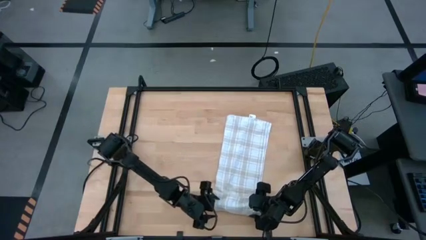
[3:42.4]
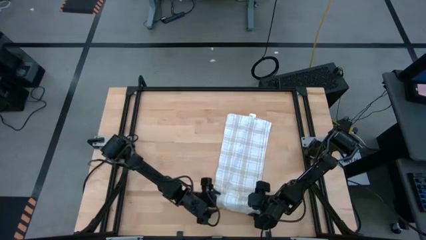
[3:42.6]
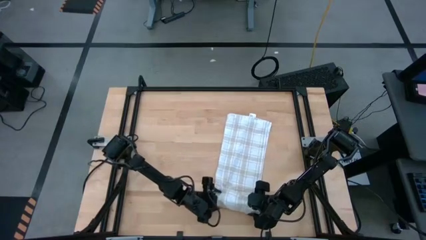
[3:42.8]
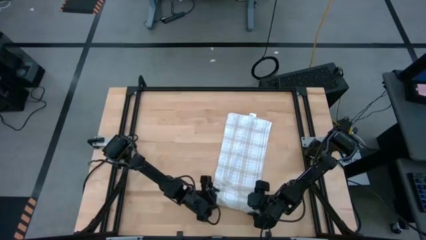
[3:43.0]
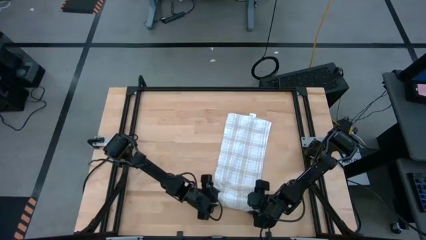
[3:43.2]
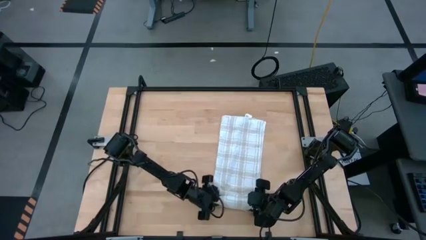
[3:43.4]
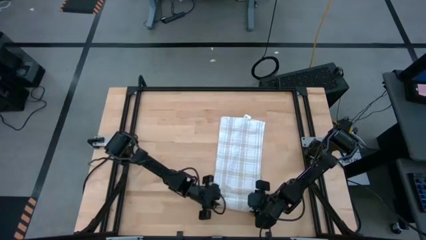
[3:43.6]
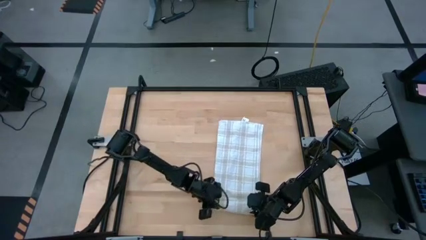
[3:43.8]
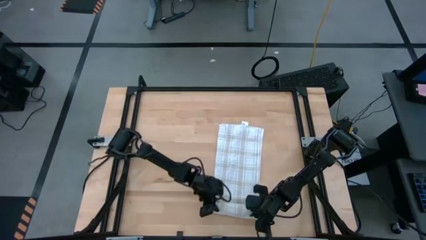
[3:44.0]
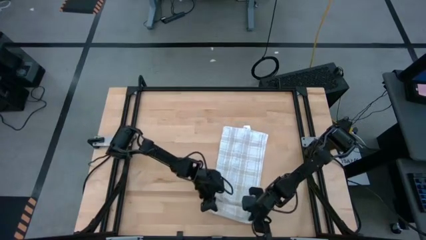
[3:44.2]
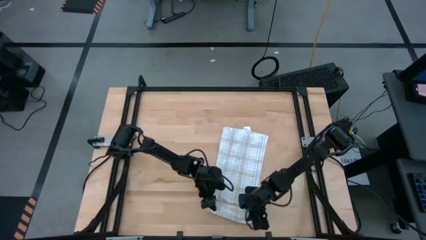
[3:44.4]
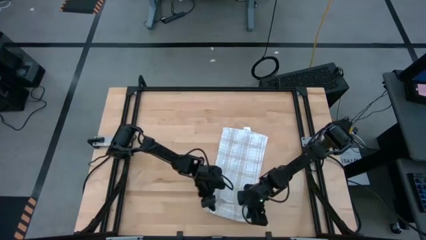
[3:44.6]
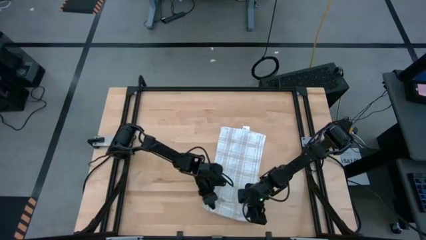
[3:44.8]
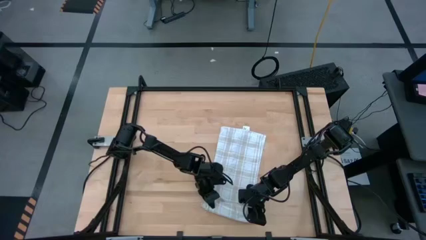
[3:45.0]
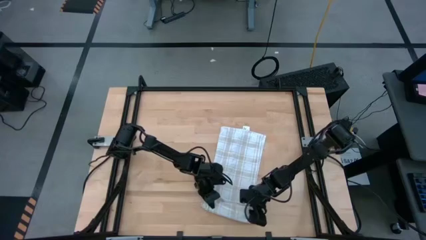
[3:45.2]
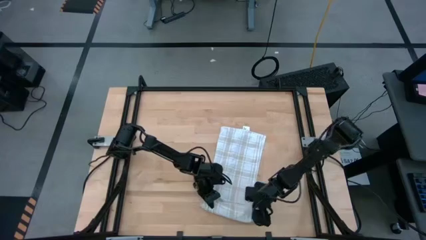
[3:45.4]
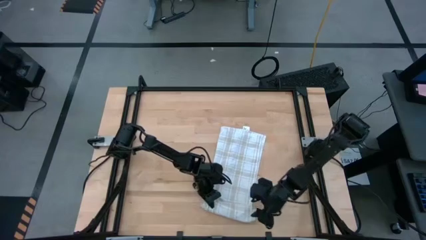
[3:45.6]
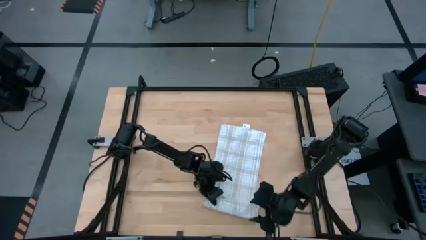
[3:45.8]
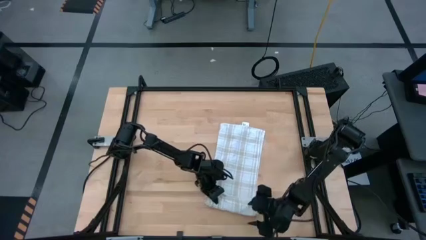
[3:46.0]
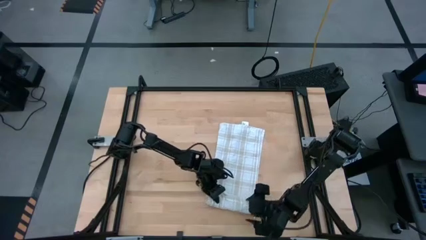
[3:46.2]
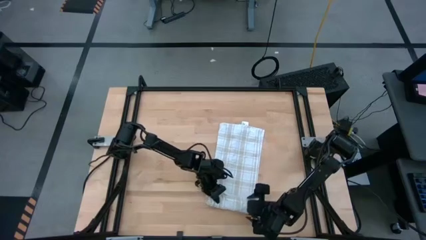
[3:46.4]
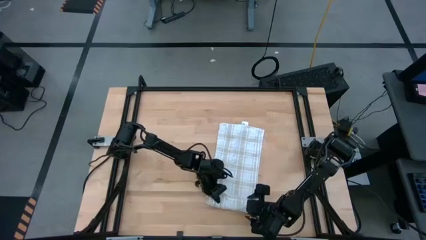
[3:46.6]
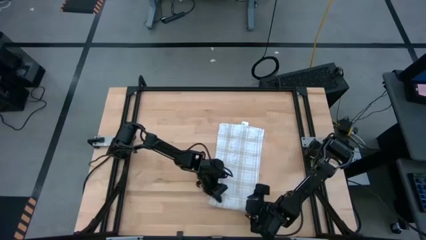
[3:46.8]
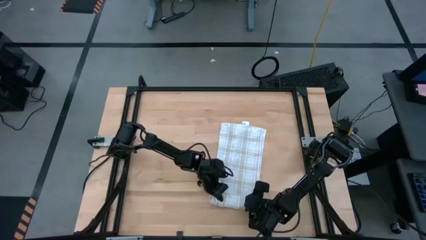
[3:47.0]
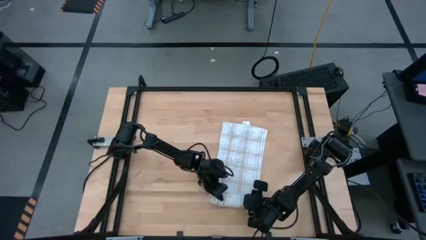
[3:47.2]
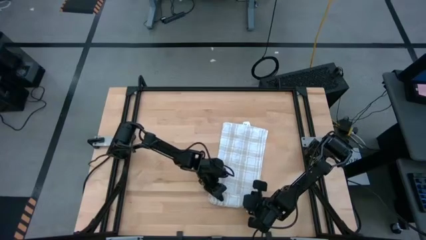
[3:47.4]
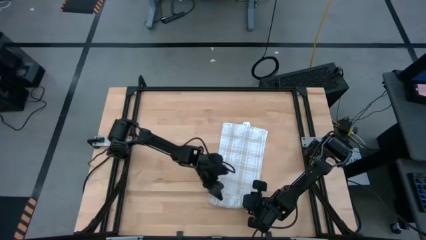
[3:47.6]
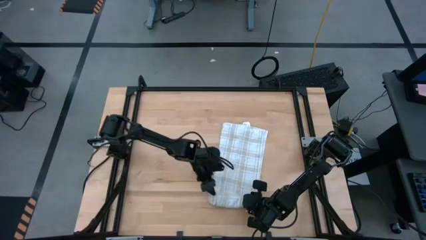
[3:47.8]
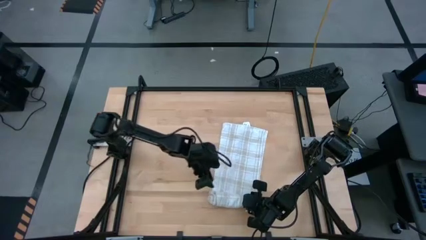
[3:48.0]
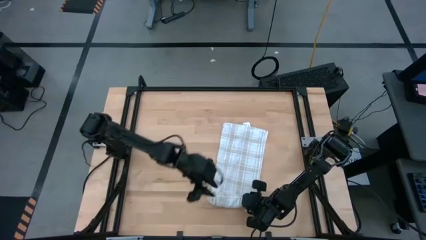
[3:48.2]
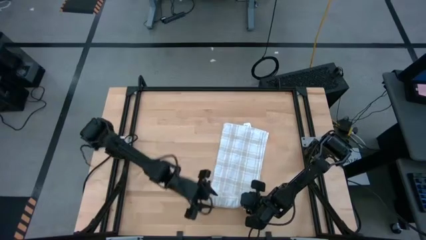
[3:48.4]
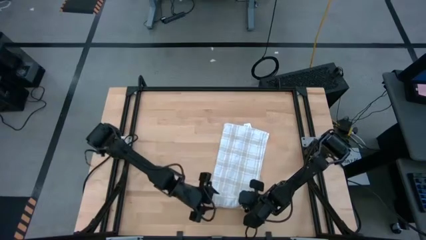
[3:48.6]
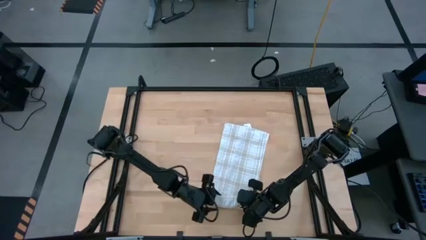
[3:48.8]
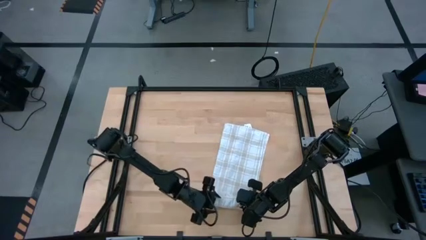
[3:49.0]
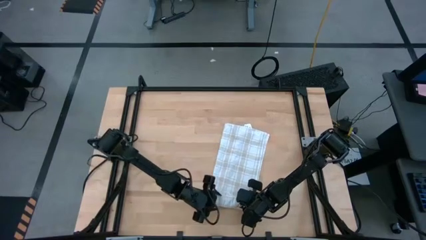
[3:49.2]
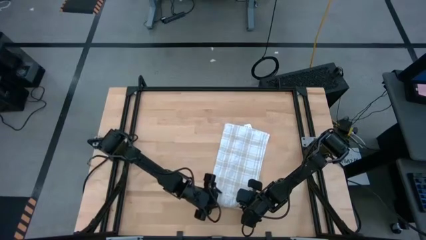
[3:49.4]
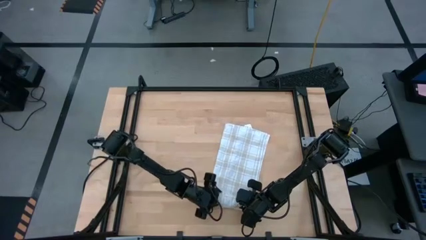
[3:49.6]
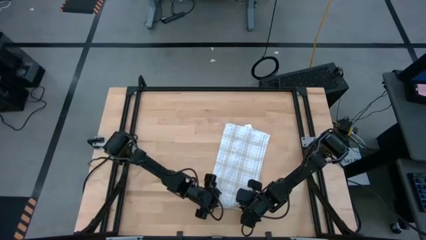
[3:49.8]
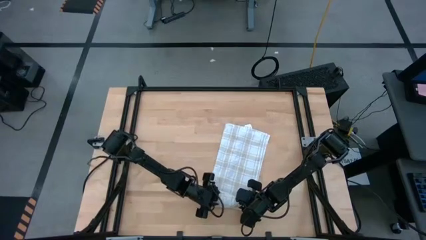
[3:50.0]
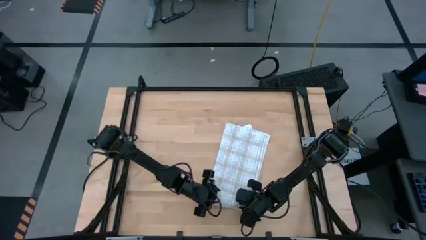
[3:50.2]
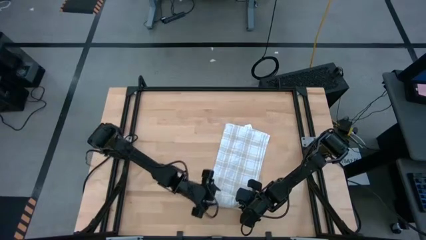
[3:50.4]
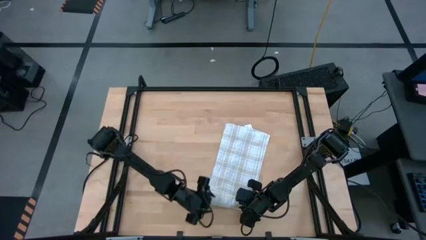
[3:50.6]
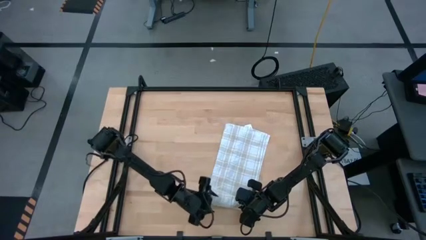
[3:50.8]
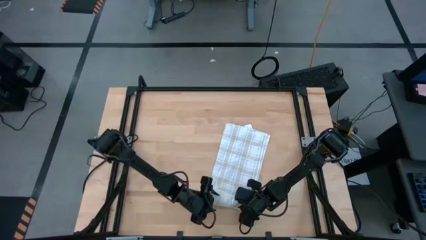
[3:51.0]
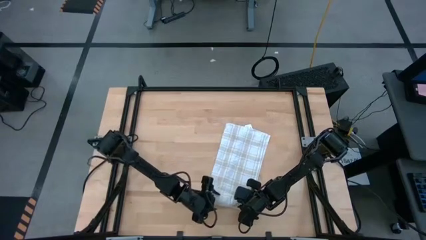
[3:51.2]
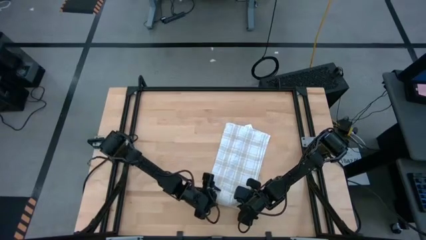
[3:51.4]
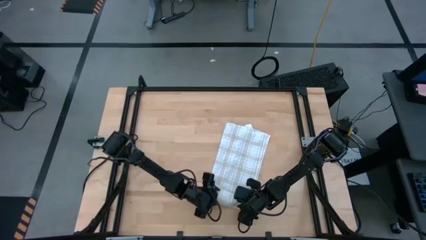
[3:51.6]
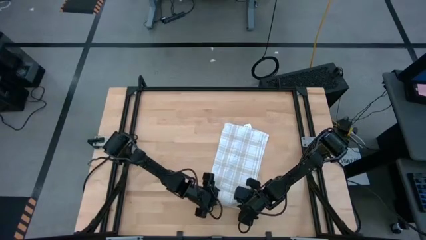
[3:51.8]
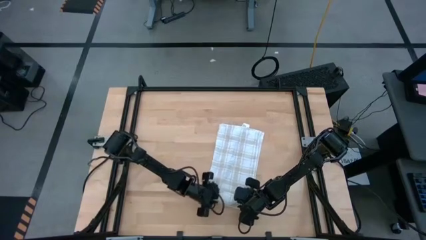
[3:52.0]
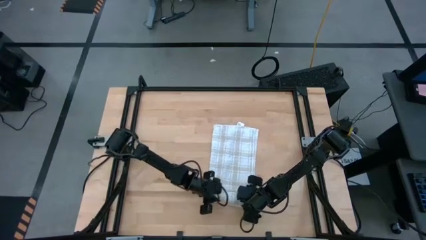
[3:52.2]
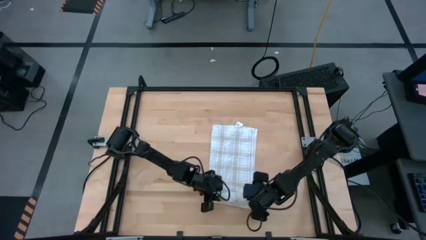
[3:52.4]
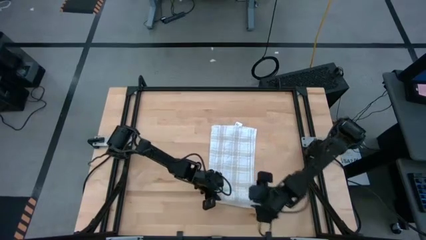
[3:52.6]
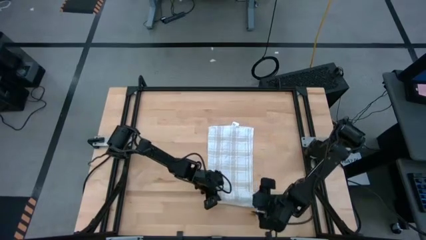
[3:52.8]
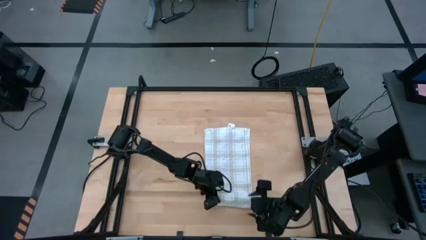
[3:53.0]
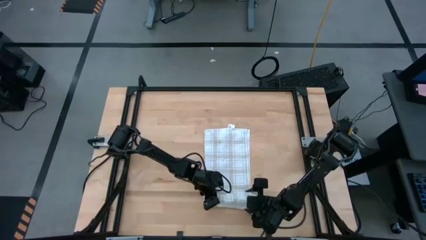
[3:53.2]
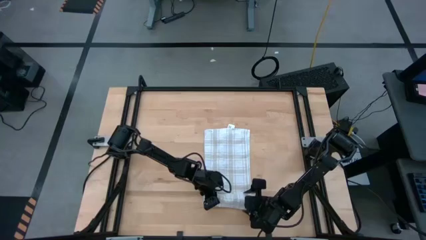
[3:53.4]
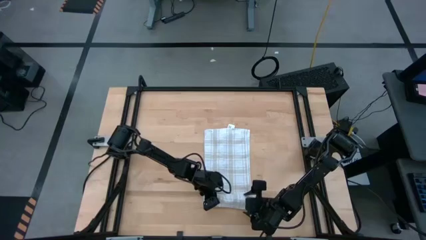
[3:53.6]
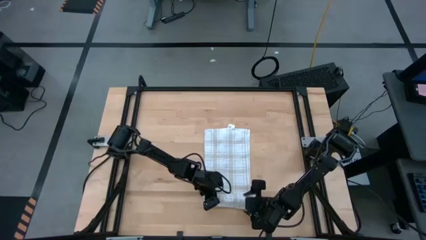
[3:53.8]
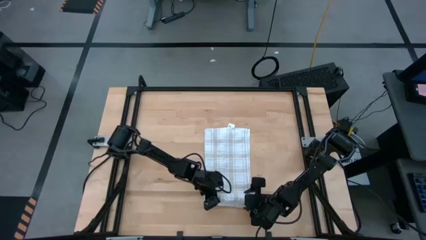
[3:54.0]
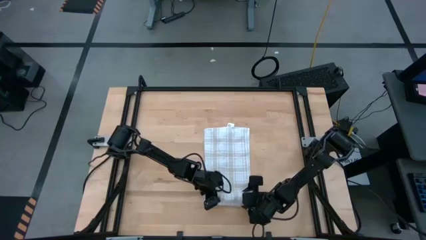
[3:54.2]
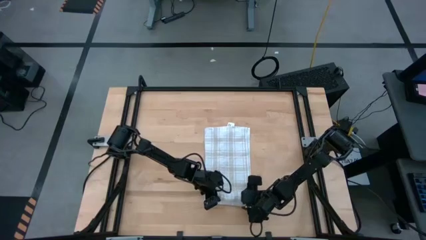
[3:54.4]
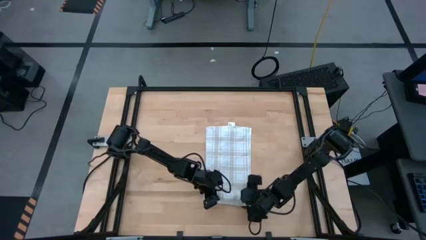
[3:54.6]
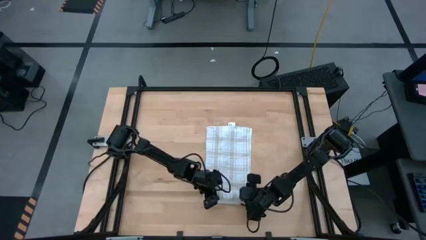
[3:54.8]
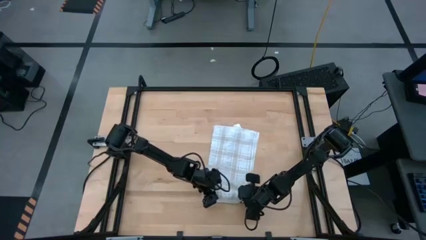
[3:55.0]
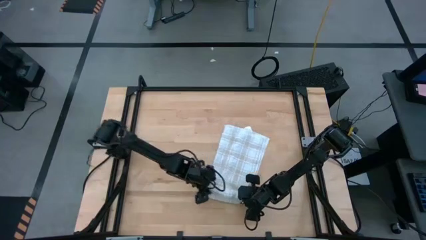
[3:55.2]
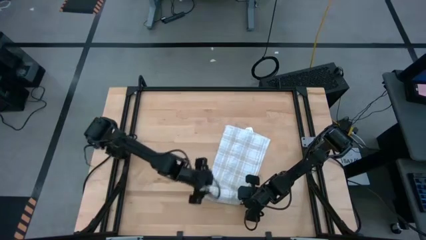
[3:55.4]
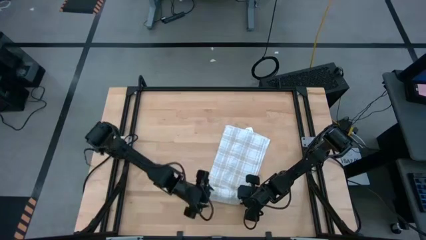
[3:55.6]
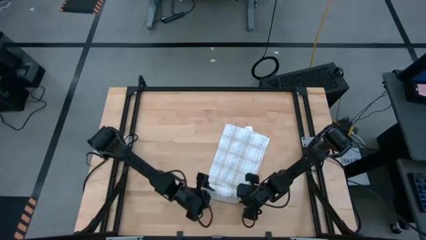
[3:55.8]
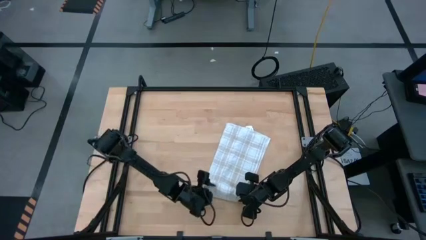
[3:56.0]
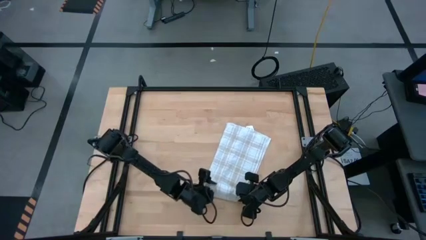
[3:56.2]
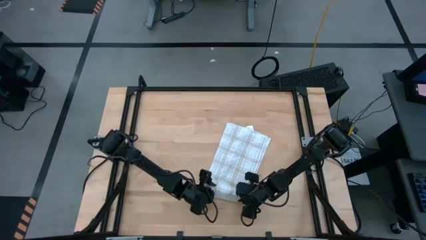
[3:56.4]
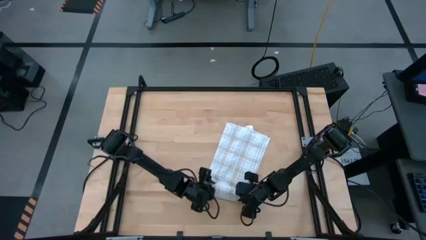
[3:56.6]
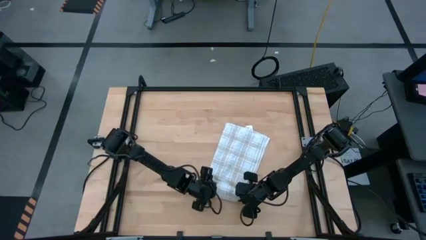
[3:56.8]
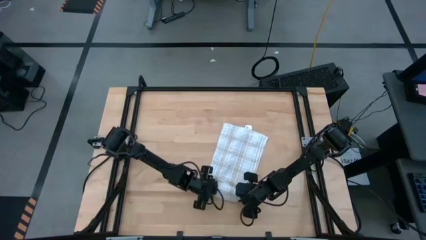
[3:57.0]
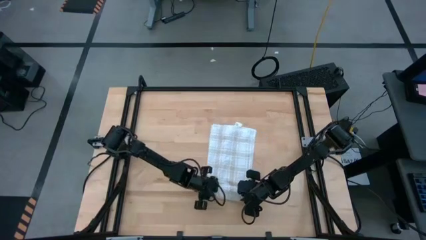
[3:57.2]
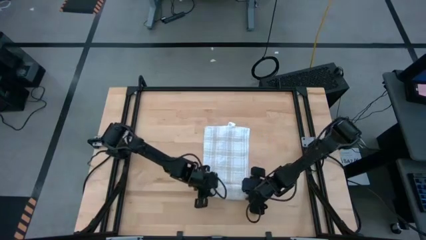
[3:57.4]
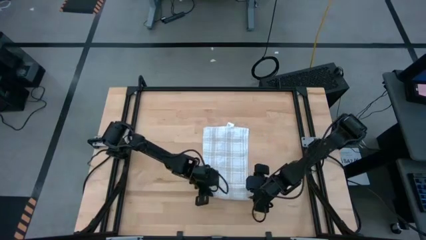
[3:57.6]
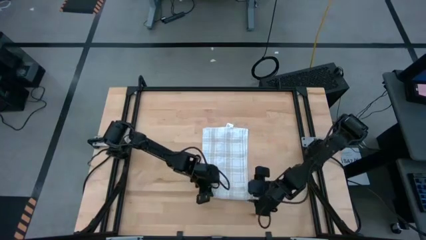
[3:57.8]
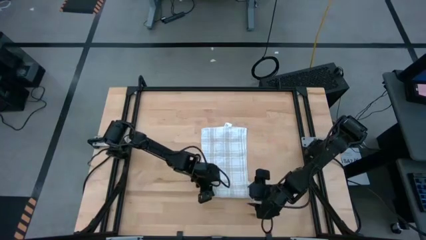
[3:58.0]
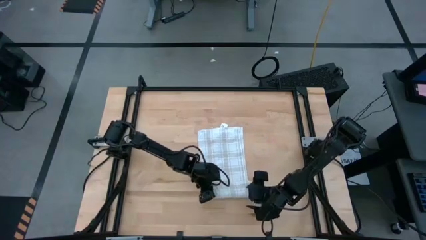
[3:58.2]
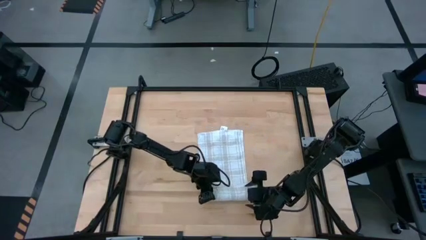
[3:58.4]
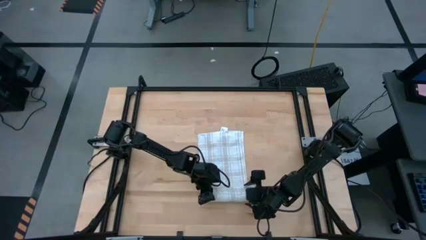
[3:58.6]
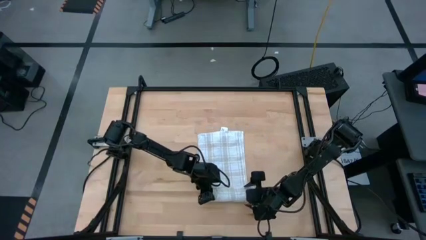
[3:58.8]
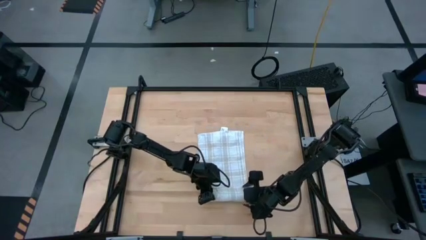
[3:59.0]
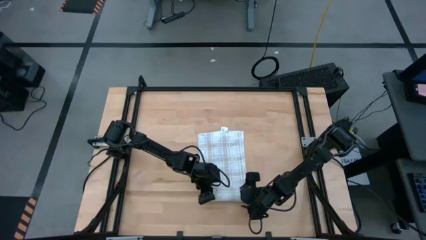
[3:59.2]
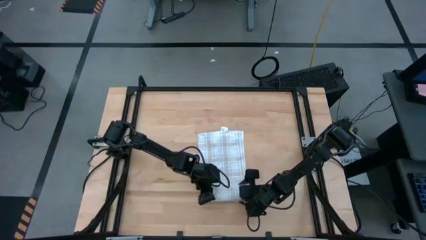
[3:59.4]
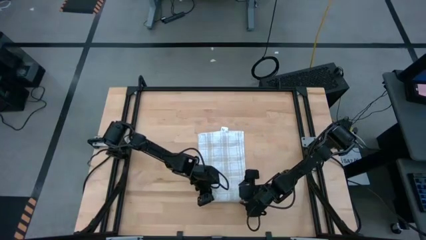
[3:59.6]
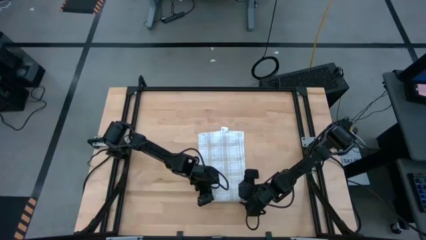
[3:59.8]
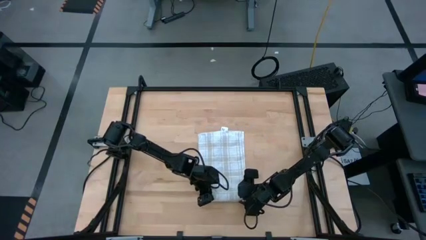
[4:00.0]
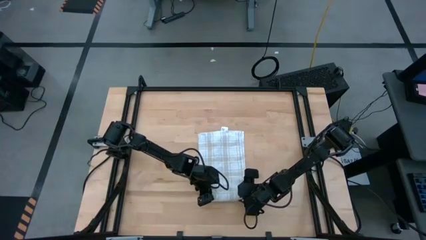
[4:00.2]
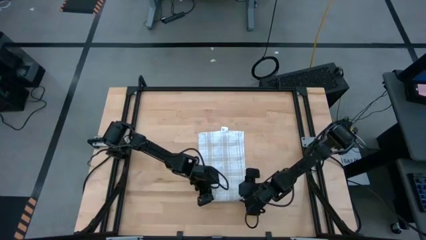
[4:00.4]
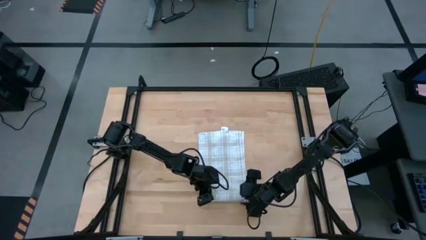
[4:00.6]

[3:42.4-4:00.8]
Task: Roll towel into tight, uniform cylinder
Roll the white towel
